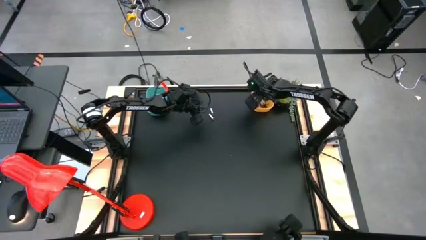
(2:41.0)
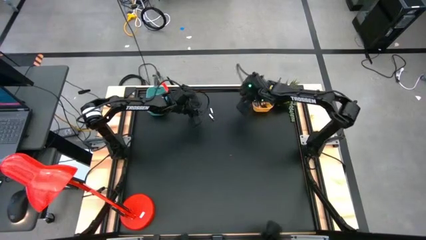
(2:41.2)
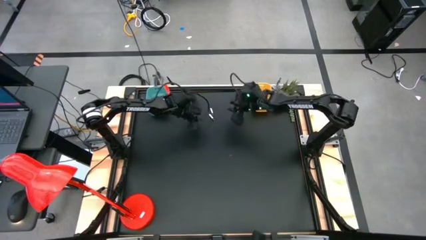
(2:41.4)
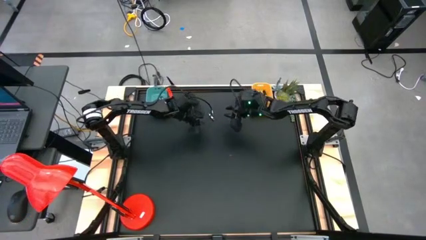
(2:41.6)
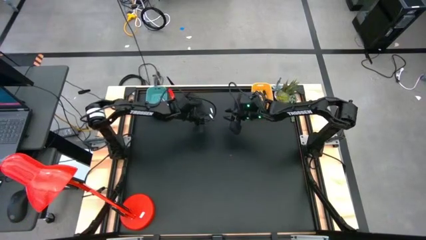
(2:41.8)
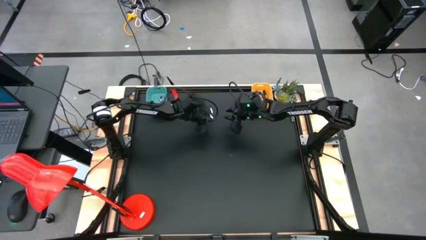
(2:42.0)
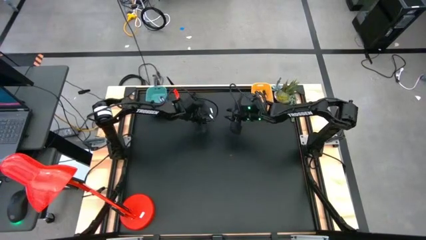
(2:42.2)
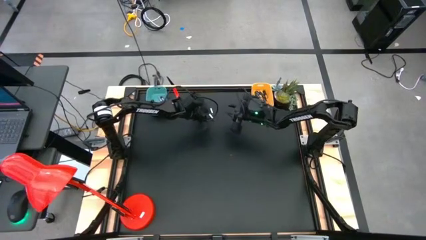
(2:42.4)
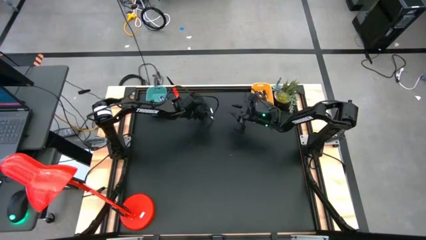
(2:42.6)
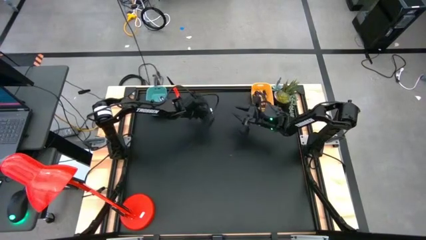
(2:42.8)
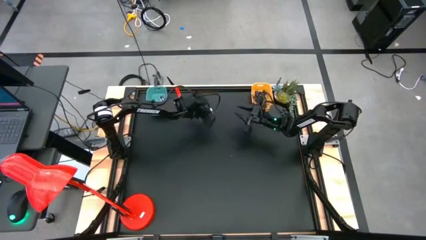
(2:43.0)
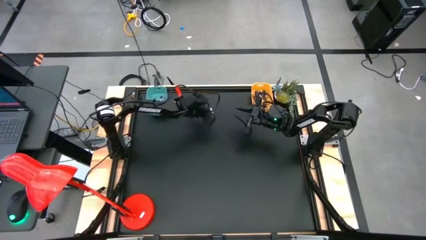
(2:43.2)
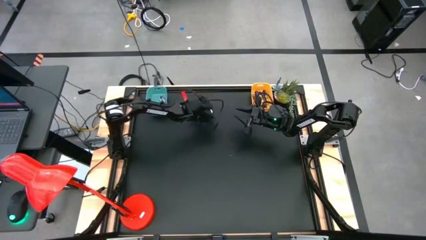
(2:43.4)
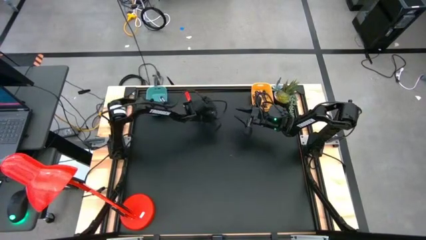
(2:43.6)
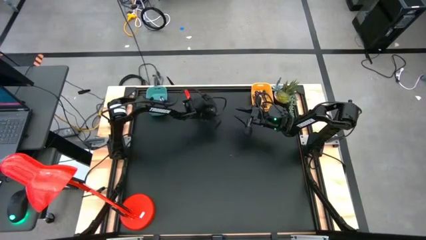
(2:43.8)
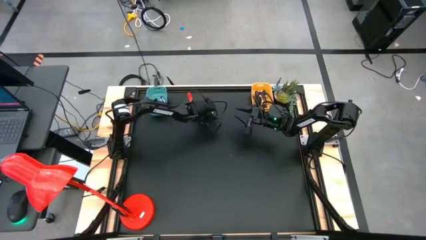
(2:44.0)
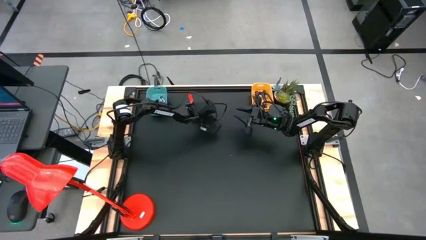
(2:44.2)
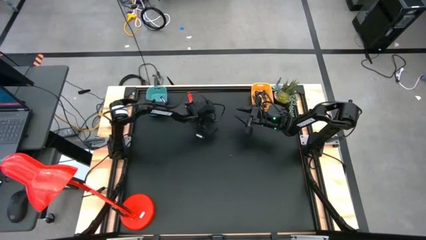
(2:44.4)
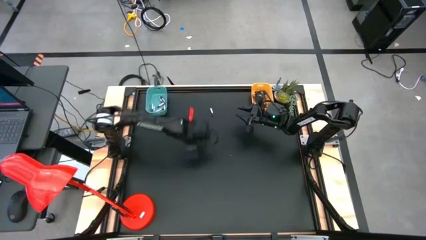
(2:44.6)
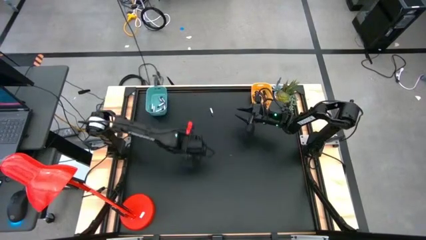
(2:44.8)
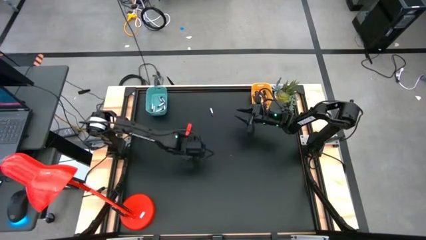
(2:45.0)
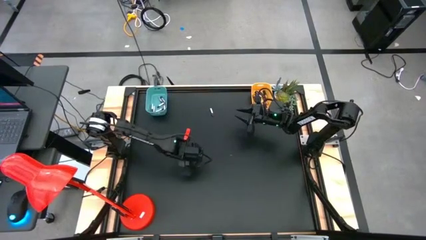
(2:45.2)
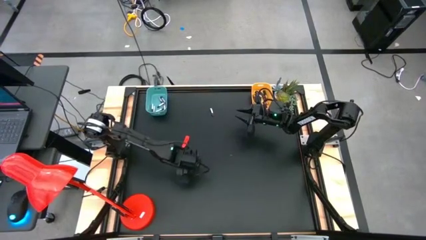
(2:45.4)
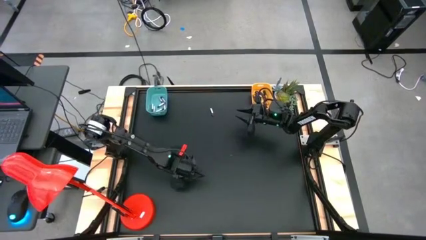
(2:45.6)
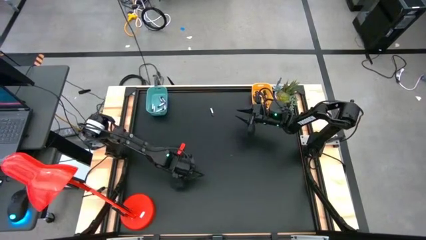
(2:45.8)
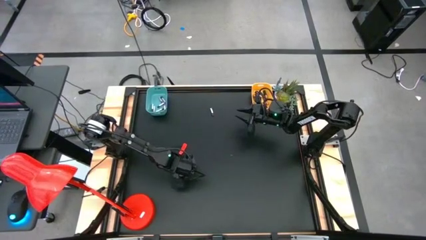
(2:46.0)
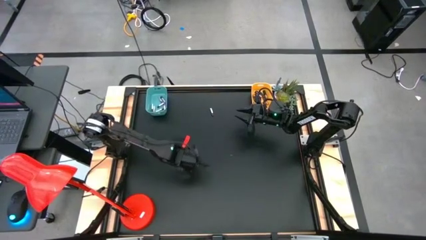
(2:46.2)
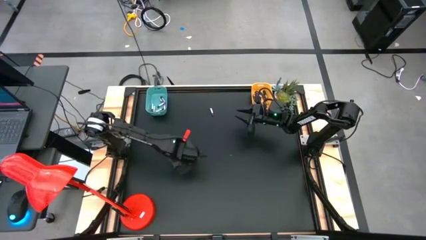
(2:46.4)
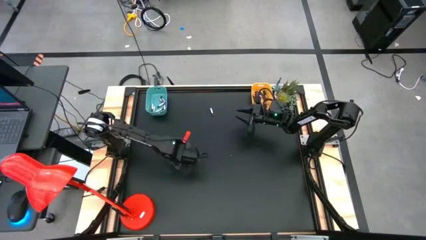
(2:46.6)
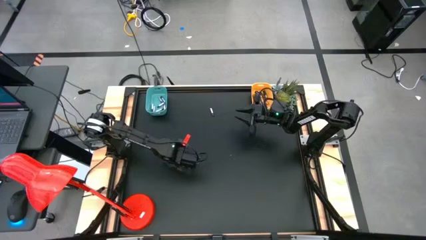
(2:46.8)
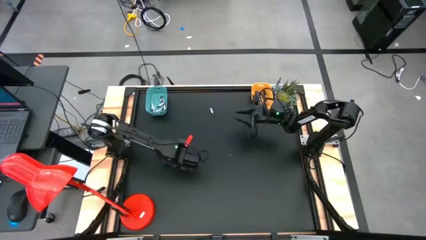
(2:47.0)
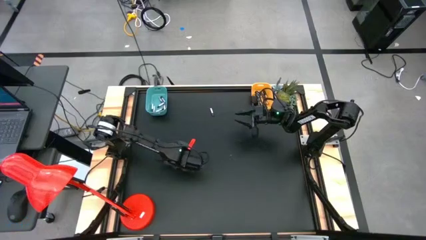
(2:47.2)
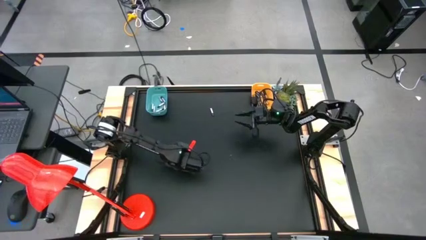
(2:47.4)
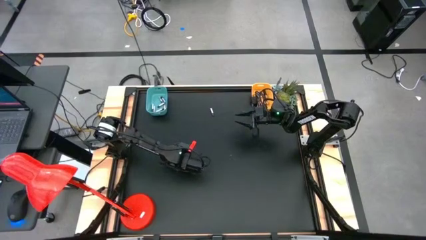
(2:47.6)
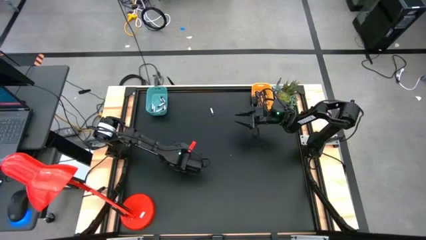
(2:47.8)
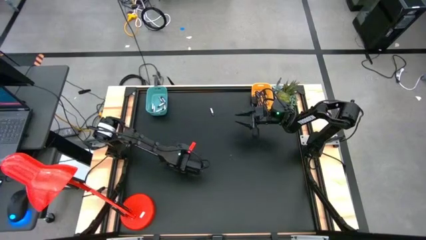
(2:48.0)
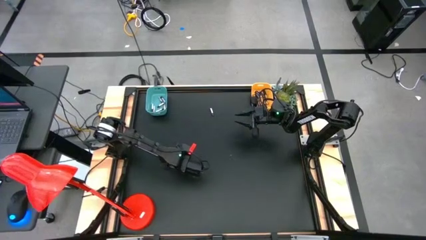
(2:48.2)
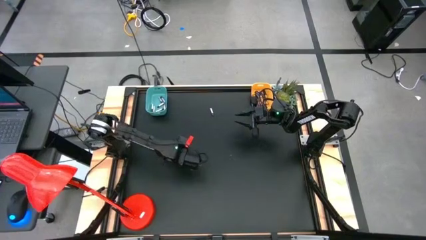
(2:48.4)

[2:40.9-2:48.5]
Task: Sort batteries
Put the silver battery into the blue bin

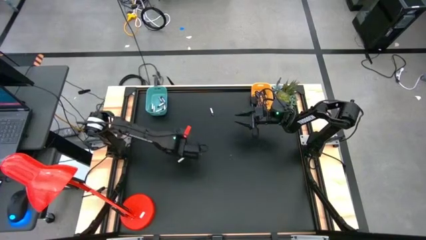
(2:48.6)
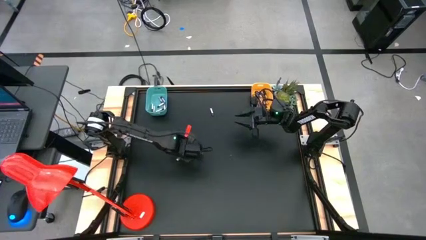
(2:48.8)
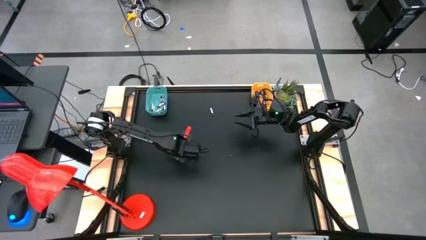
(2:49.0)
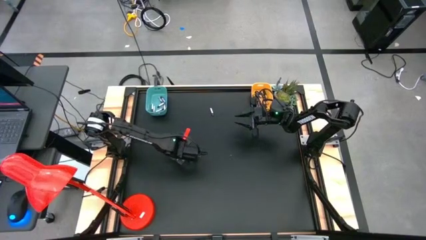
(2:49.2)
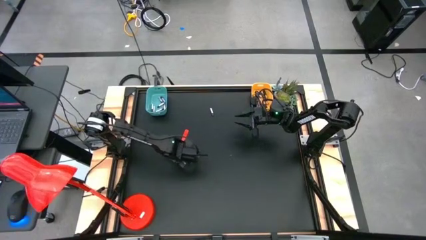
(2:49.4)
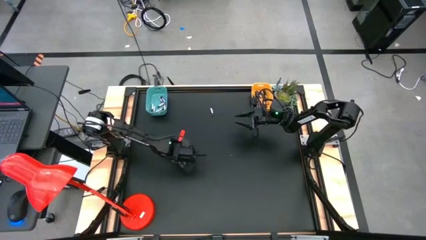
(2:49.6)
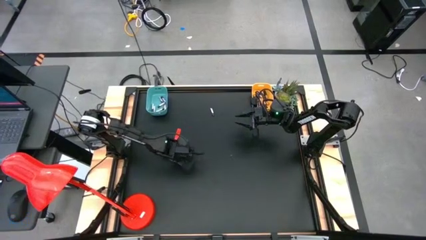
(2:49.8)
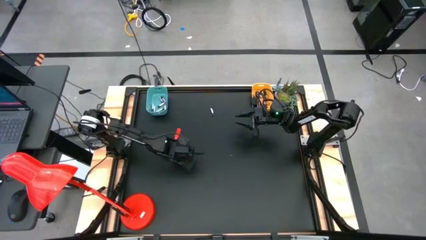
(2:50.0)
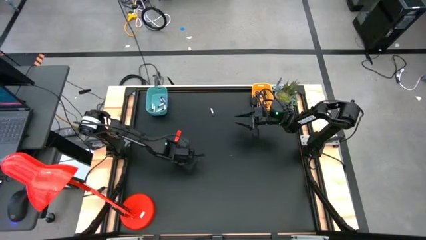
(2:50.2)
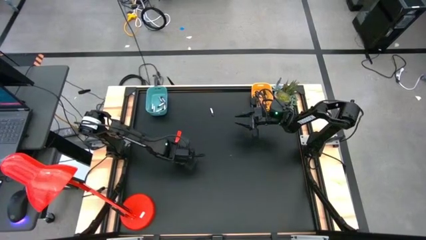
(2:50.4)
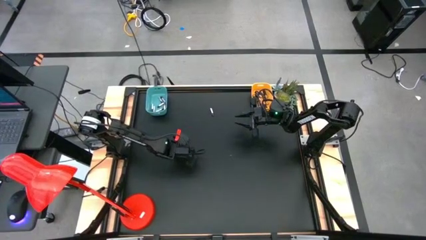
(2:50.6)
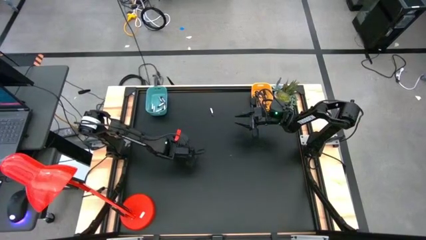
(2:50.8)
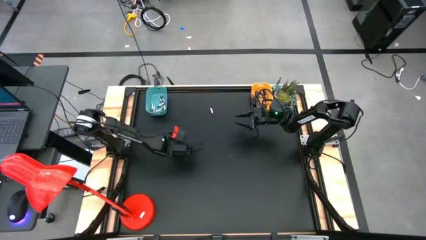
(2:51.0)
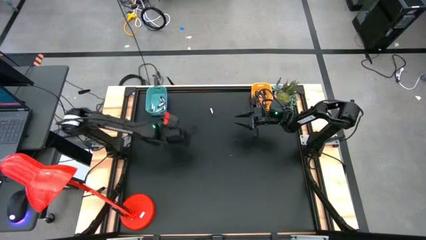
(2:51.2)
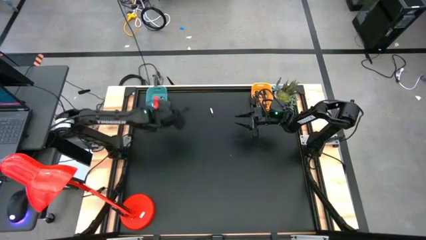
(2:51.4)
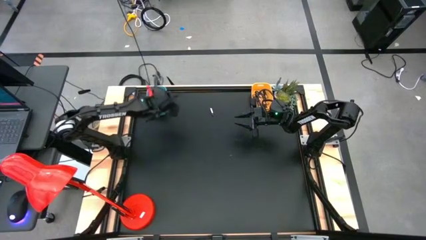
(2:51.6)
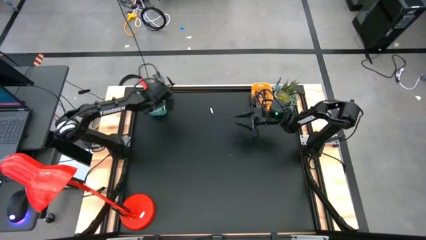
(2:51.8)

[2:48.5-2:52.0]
Put the silver battery into the blue bin

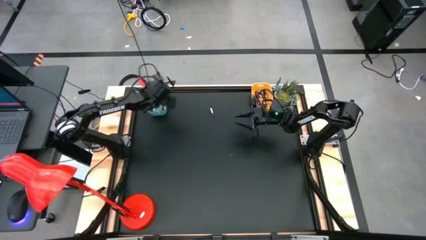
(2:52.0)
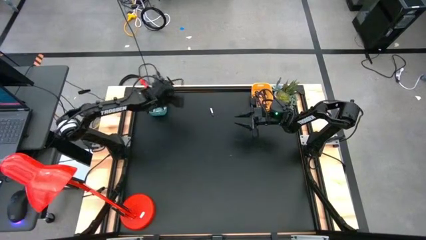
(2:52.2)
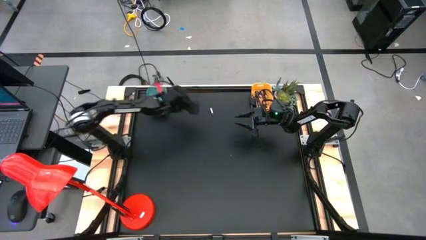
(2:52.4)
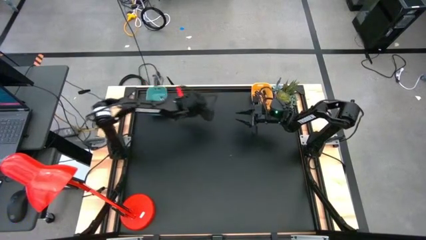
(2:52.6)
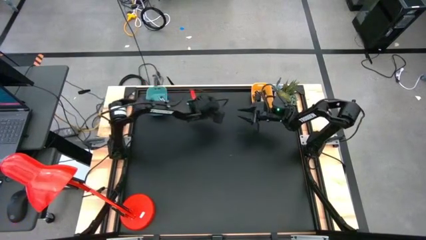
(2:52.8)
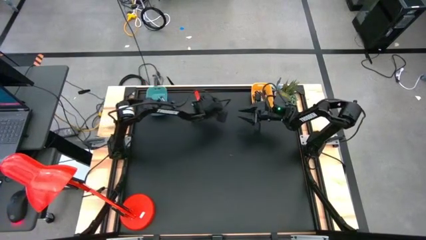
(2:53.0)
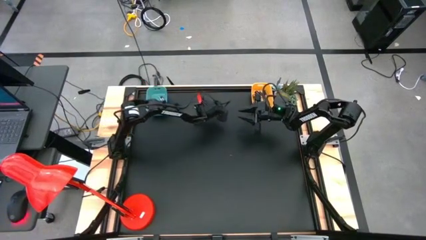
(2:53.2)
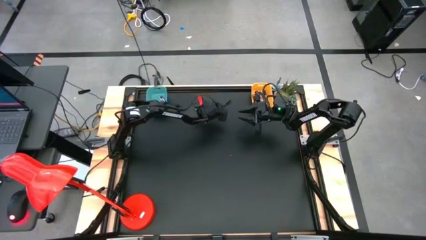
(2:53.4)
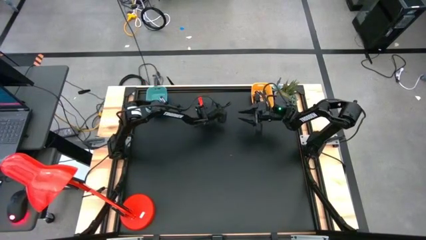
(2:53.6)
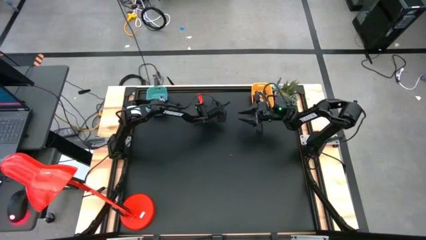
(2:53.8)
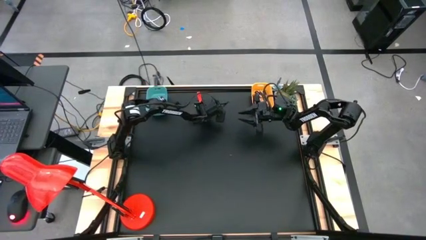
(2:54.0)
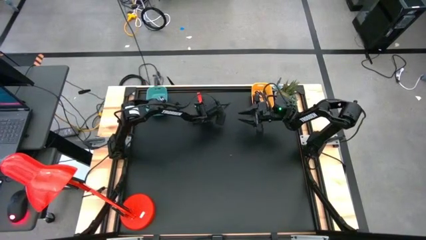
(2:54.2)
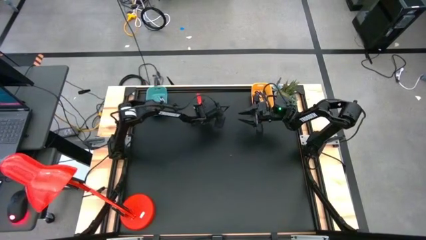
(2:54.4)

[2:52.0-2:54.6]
Put the silver battery into the blue bin
